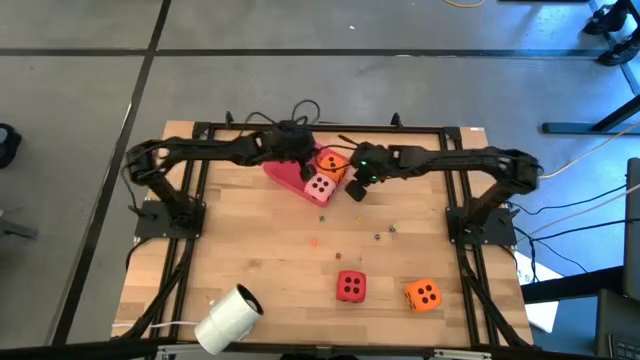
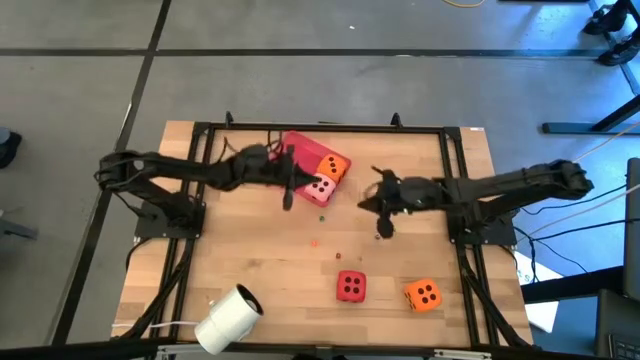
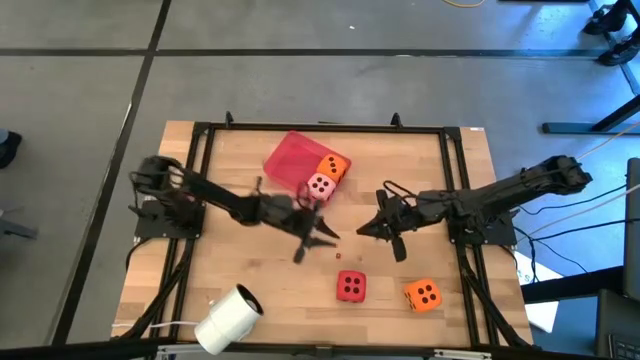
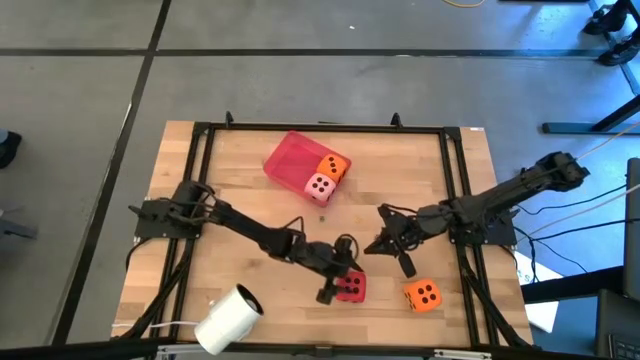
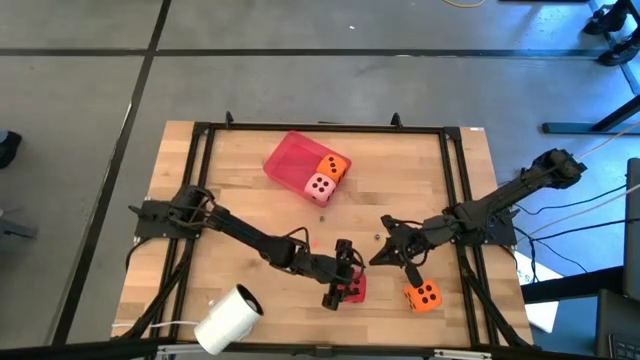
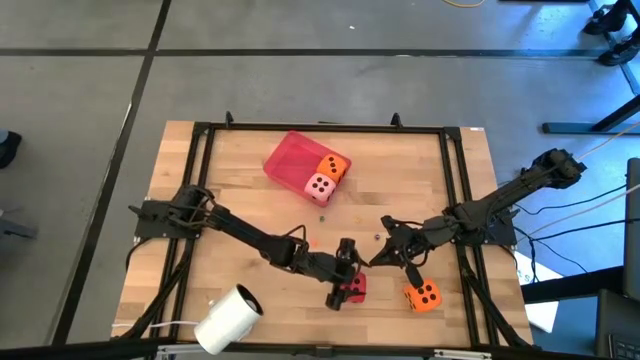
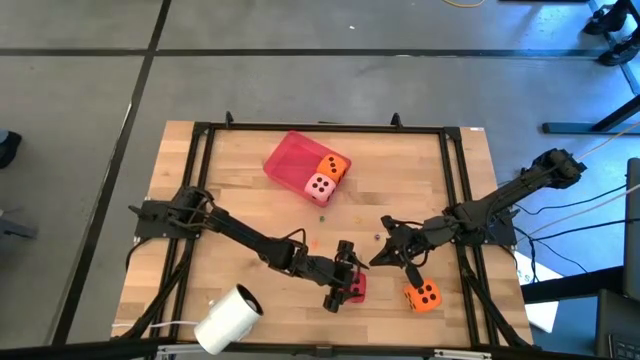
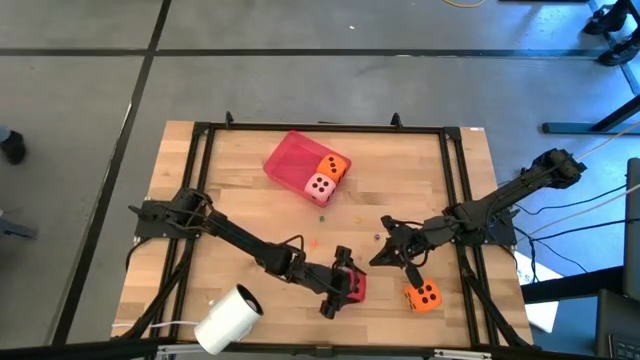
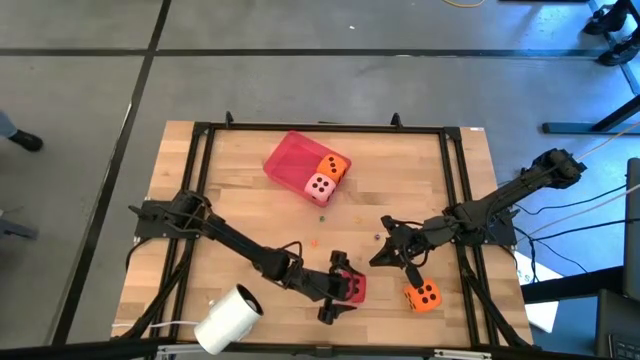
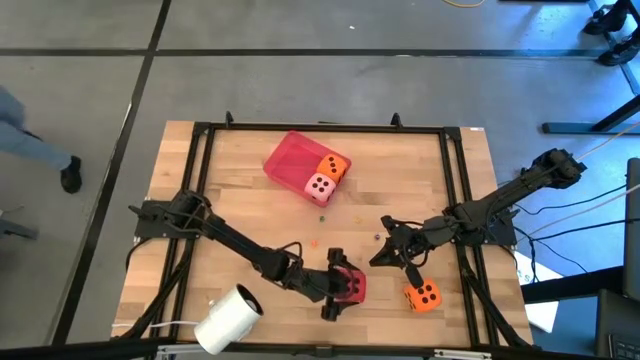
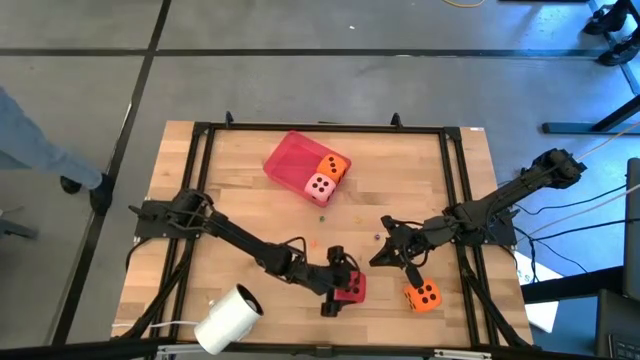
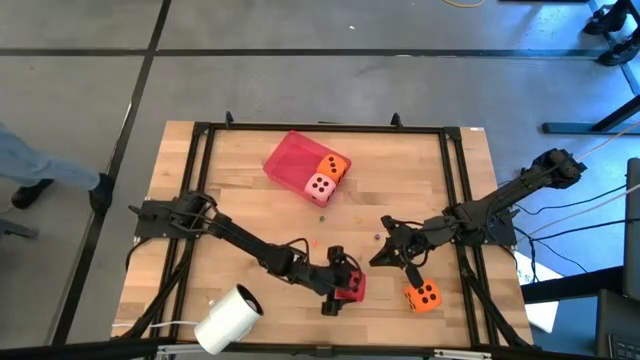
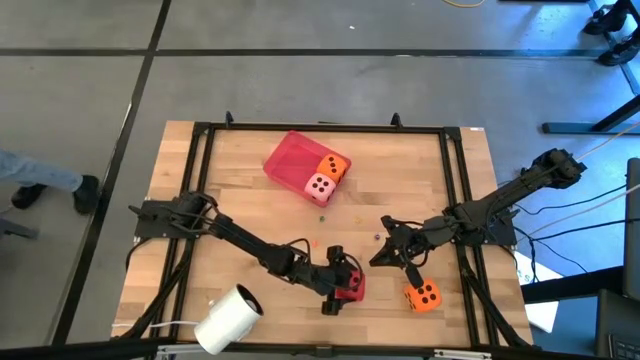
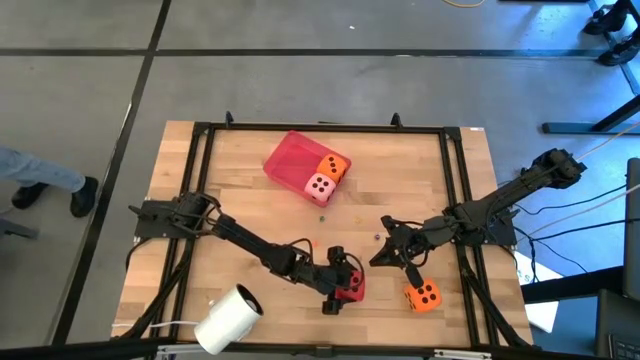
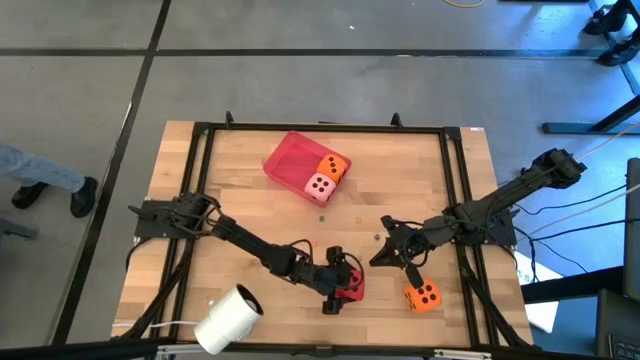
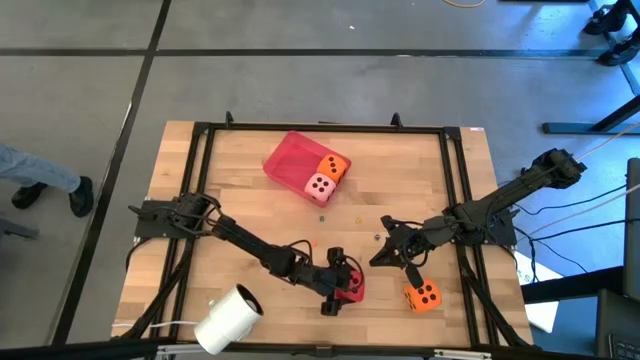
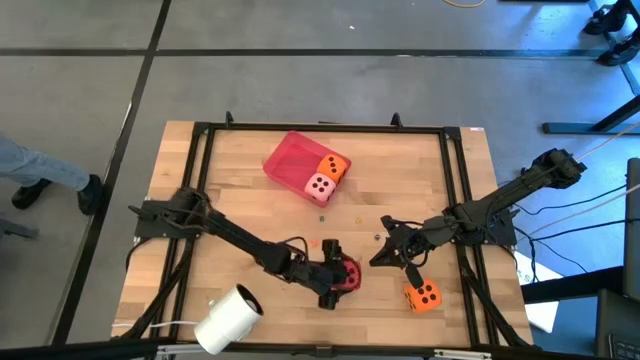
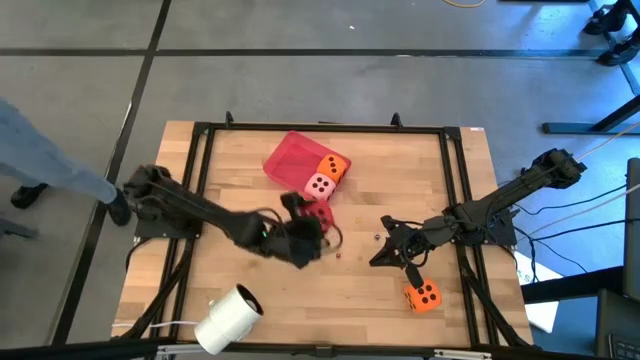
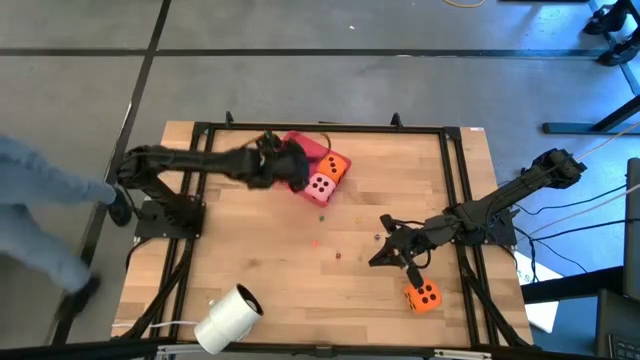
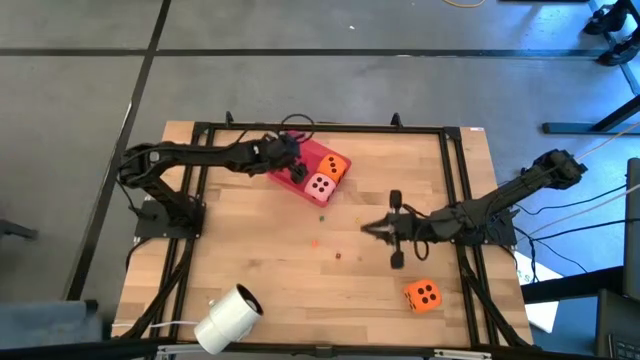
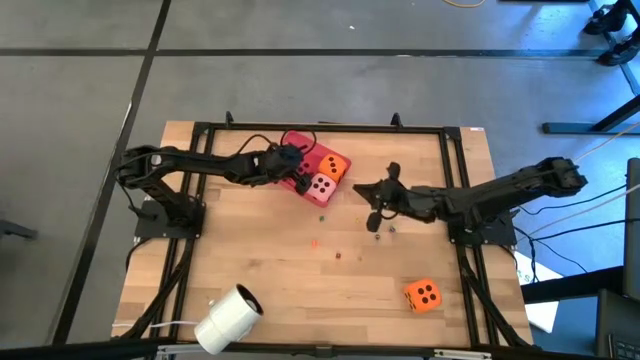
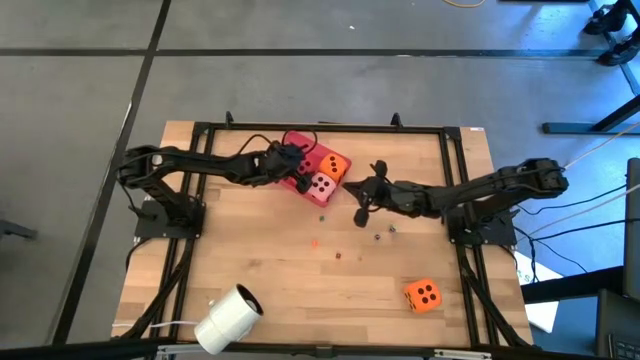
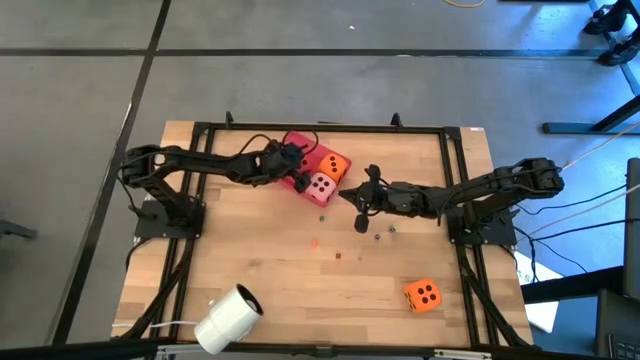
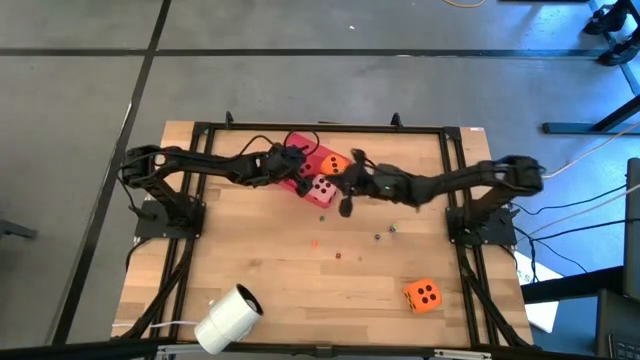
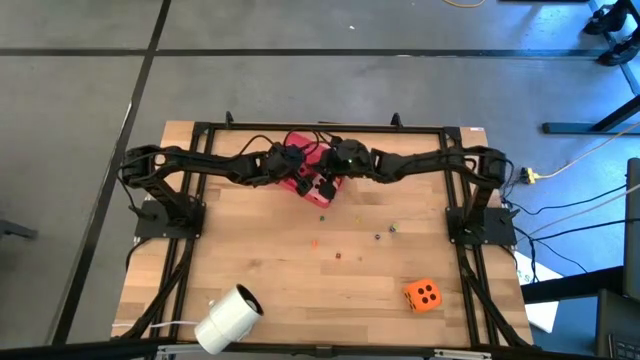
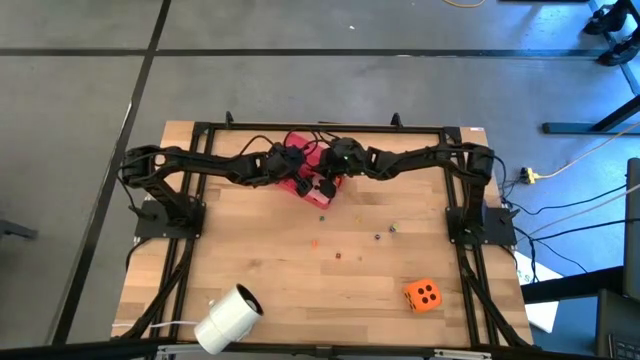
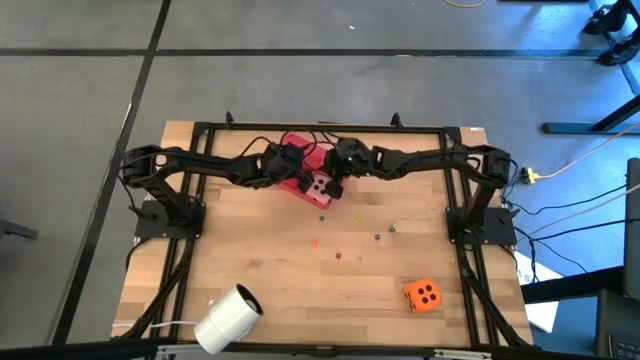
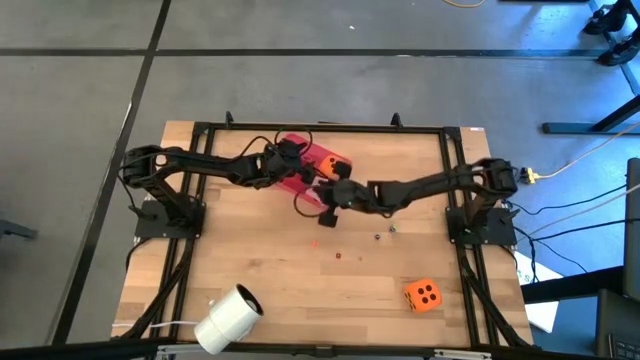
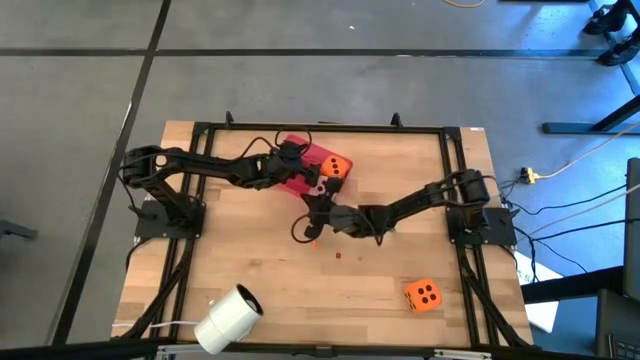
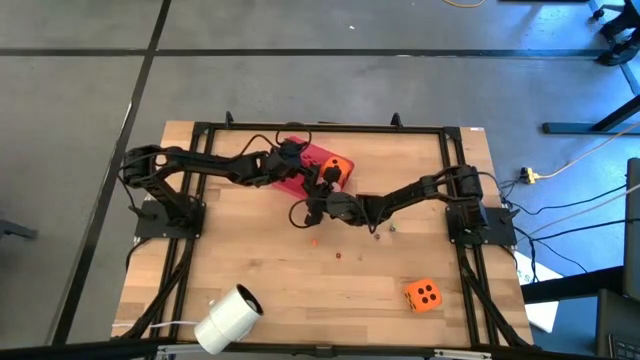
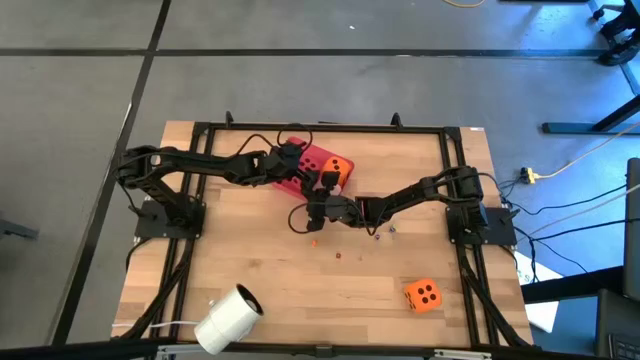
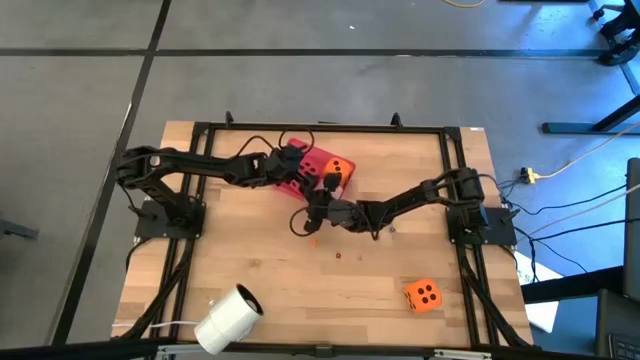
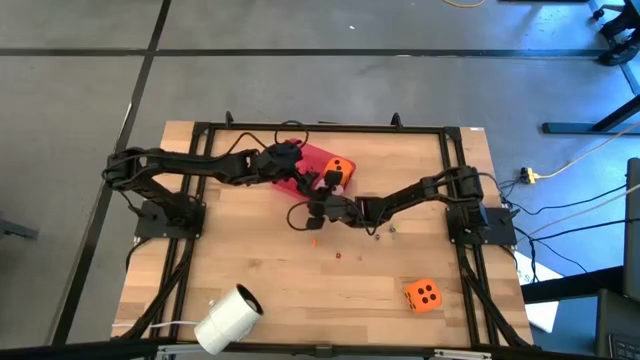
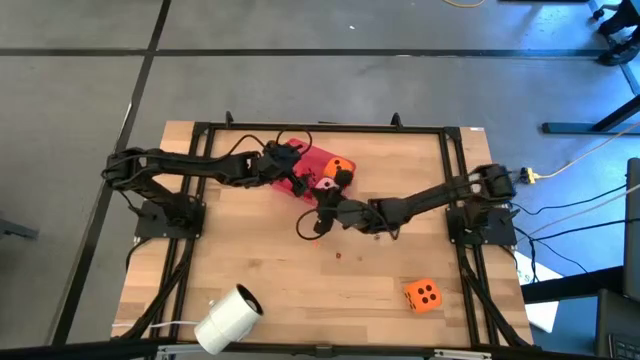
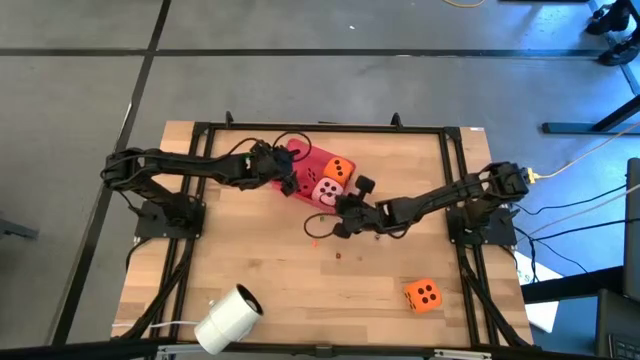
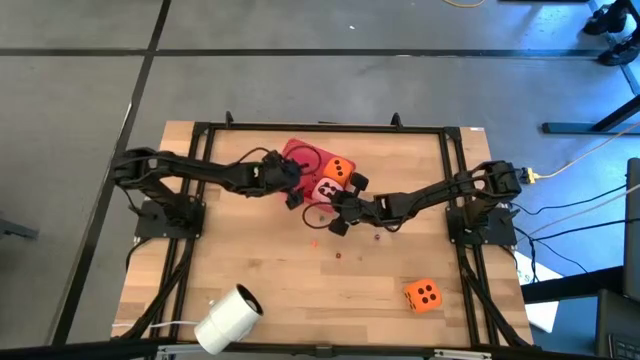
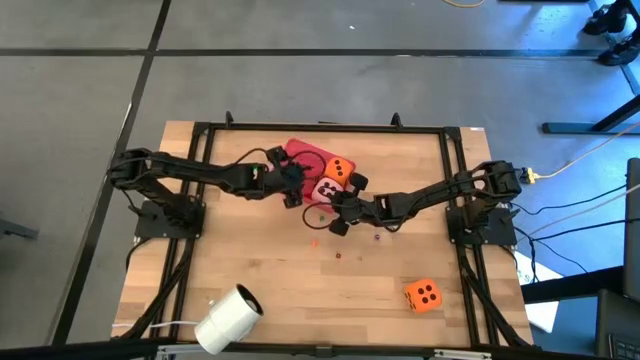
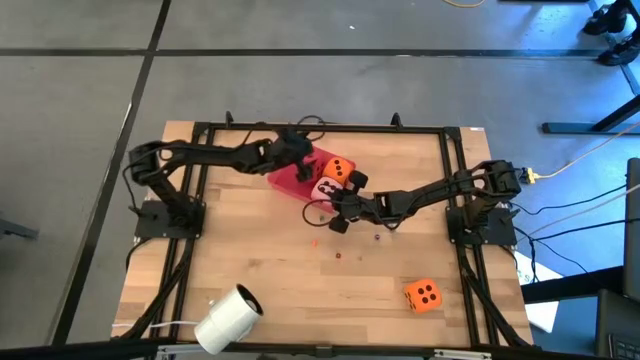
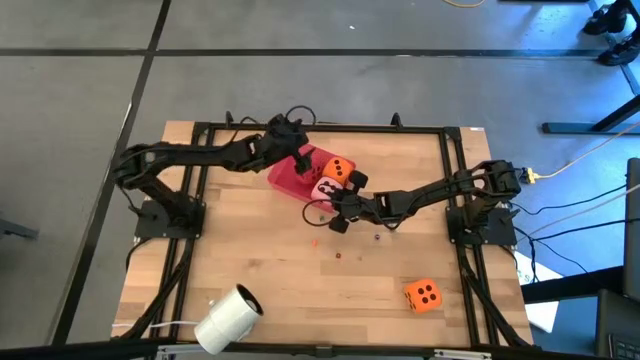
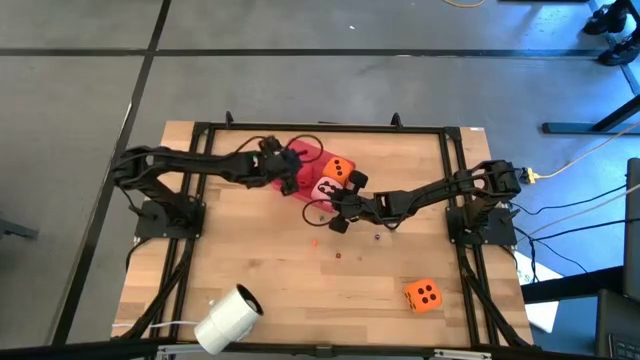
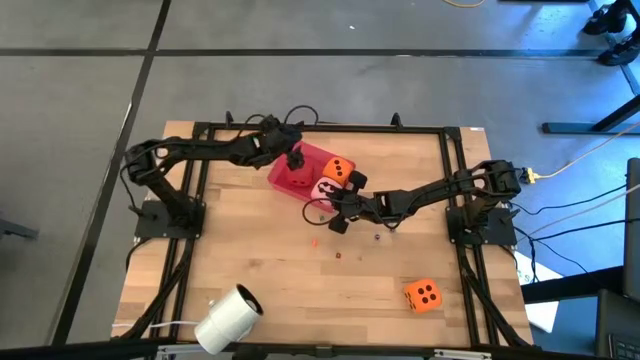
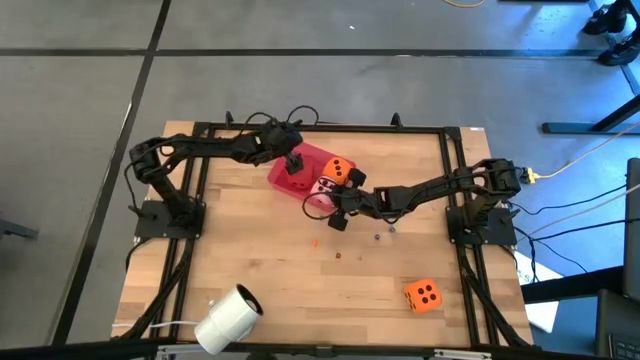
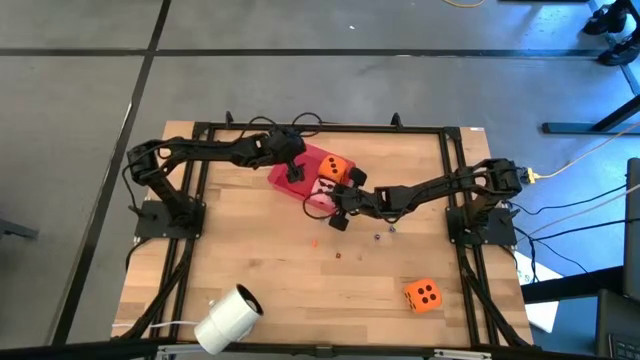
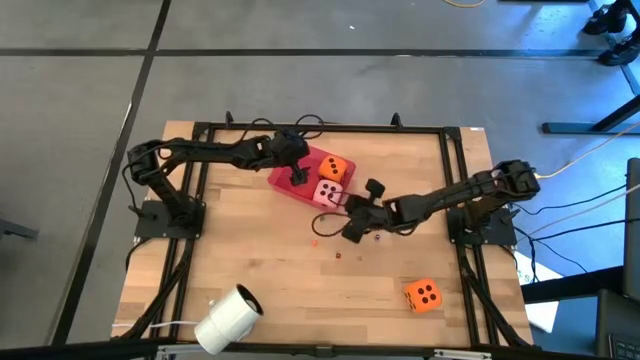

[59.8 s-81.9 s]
Task: Pick & Place Dice
Put the large red die into the red bin
